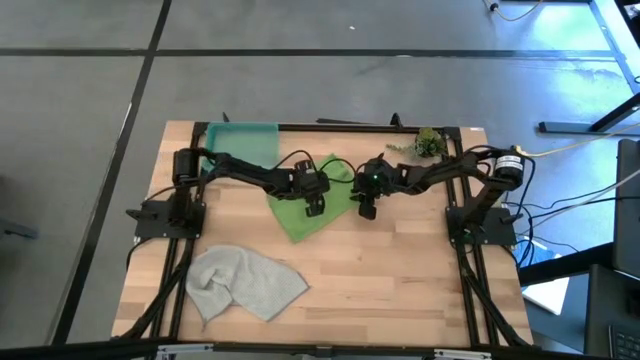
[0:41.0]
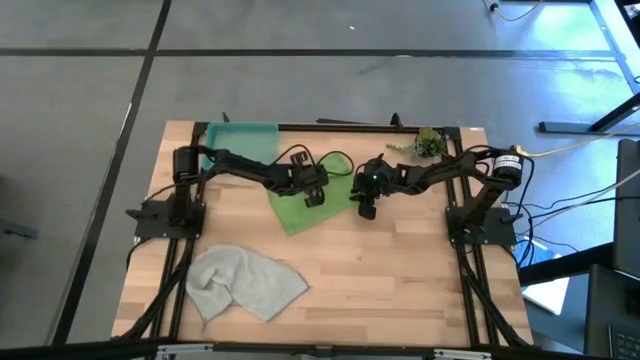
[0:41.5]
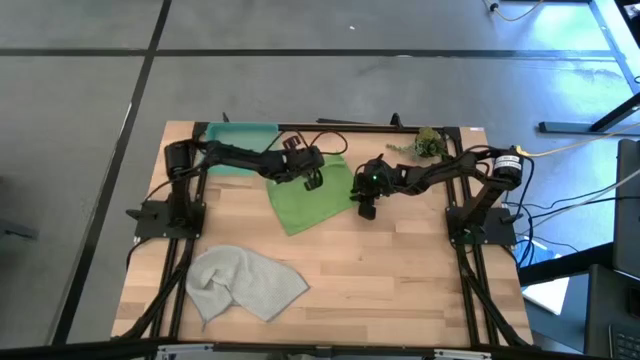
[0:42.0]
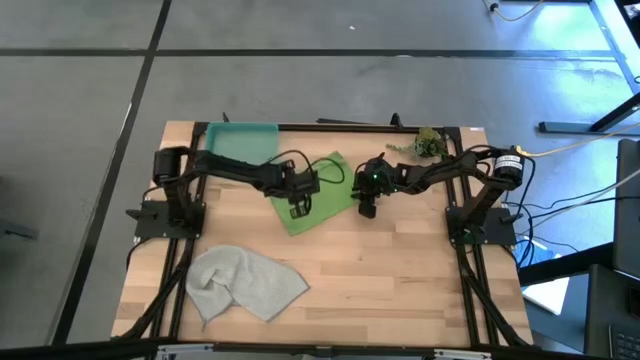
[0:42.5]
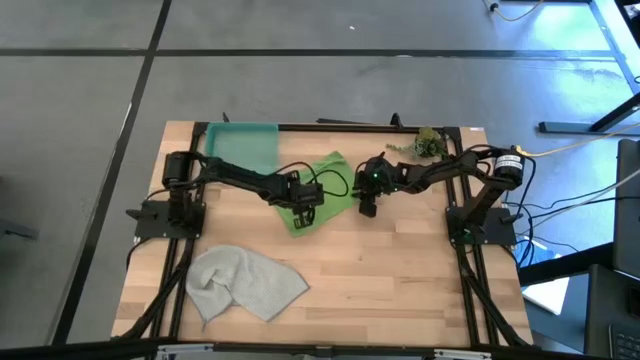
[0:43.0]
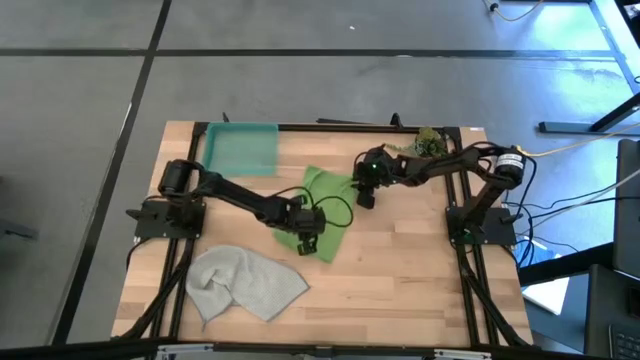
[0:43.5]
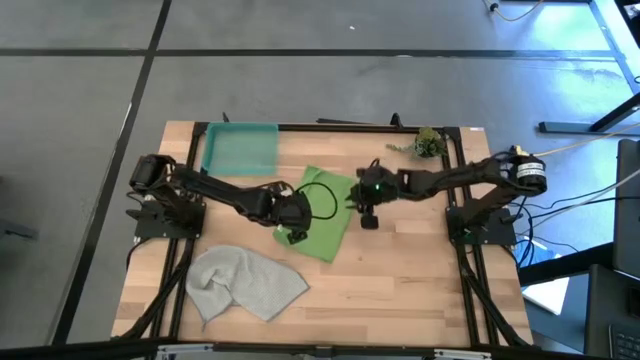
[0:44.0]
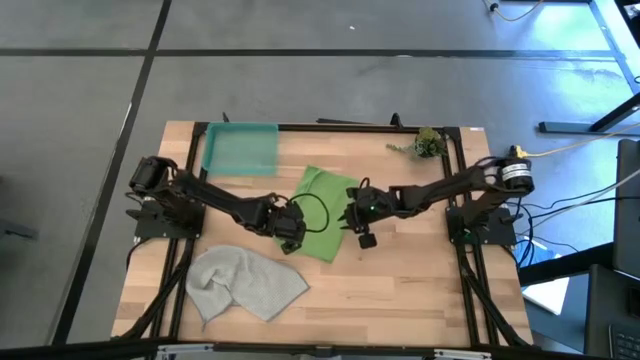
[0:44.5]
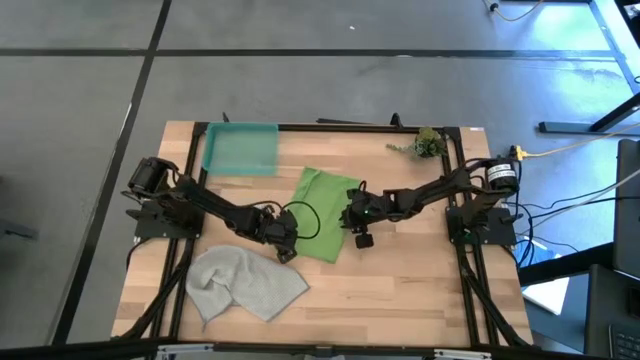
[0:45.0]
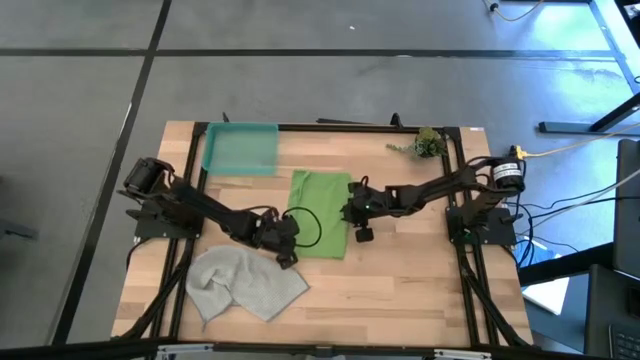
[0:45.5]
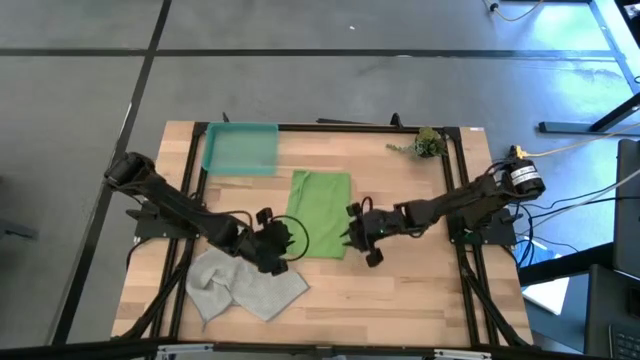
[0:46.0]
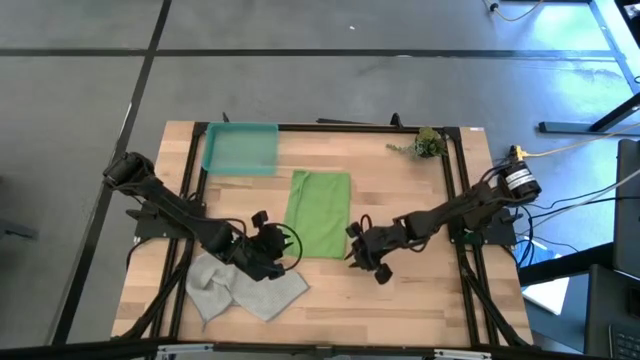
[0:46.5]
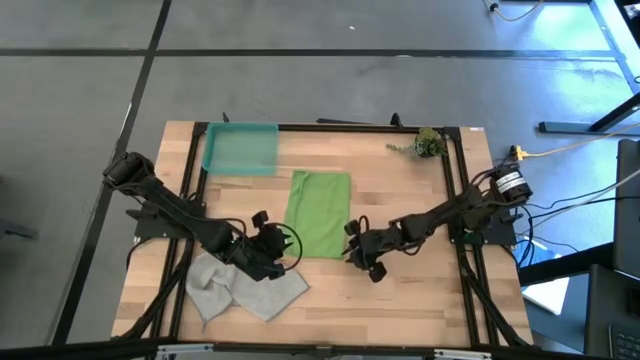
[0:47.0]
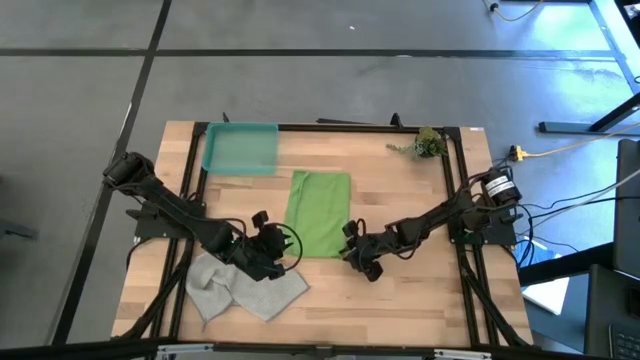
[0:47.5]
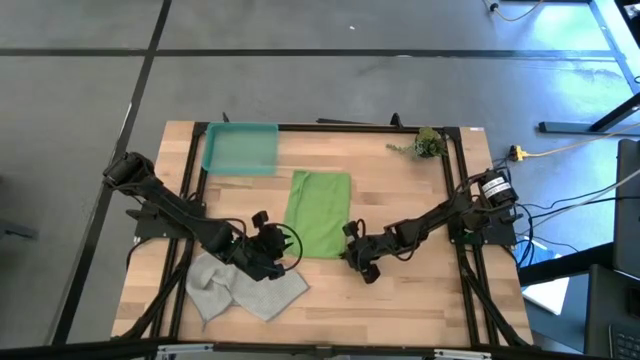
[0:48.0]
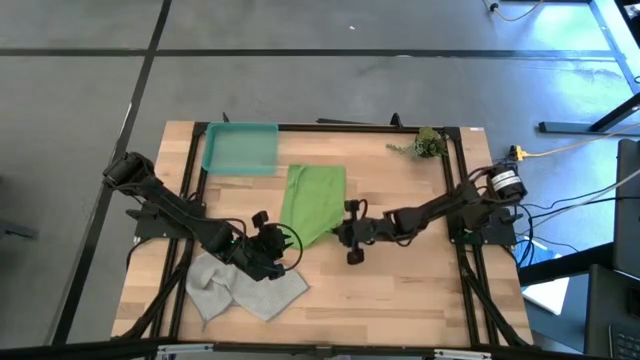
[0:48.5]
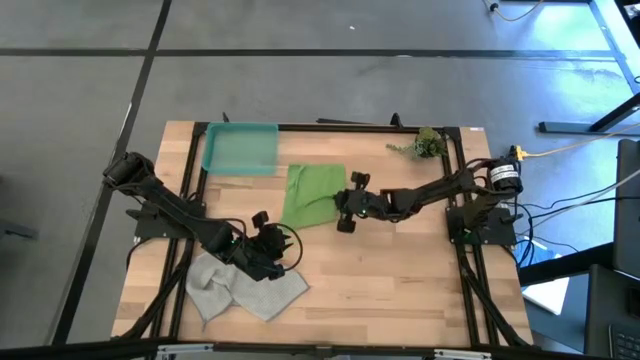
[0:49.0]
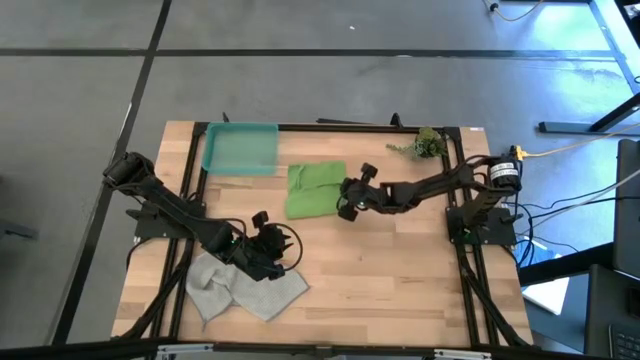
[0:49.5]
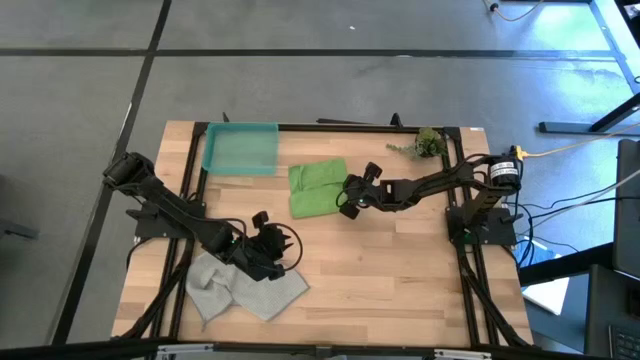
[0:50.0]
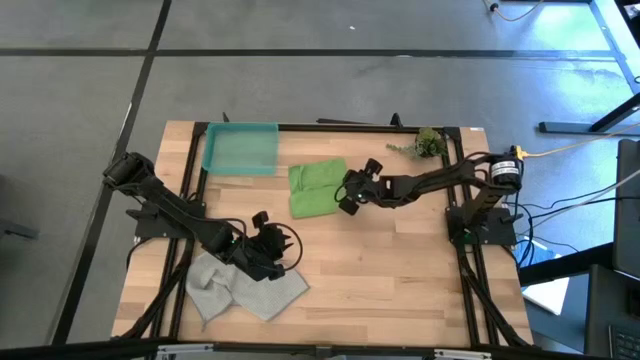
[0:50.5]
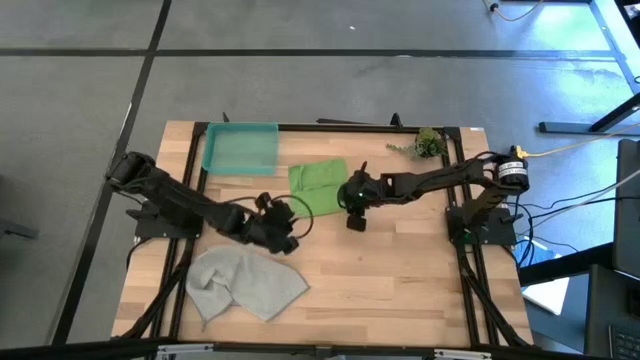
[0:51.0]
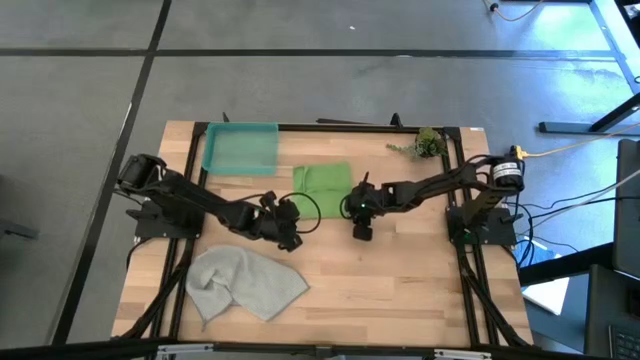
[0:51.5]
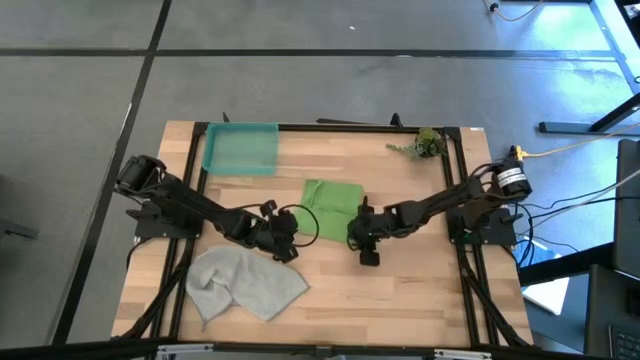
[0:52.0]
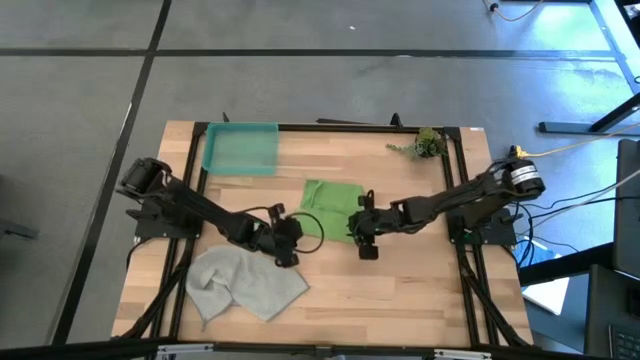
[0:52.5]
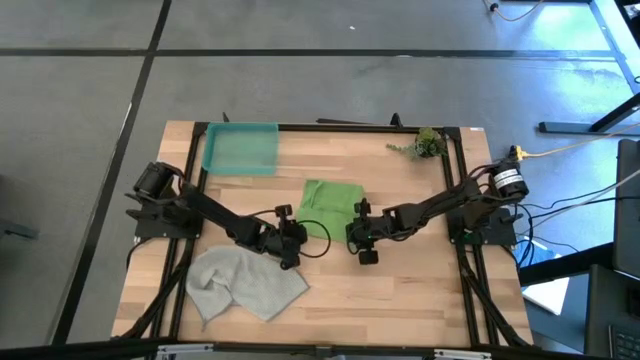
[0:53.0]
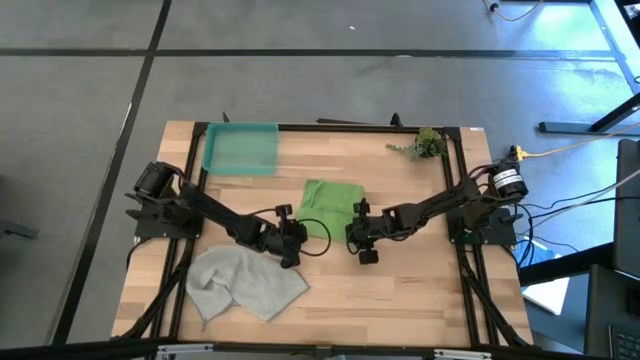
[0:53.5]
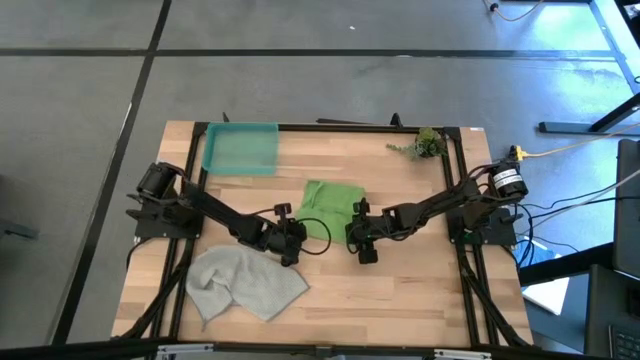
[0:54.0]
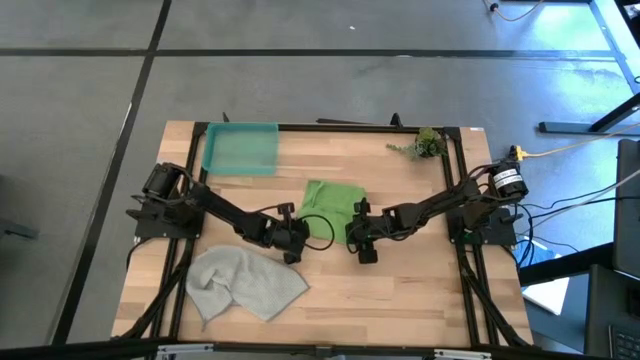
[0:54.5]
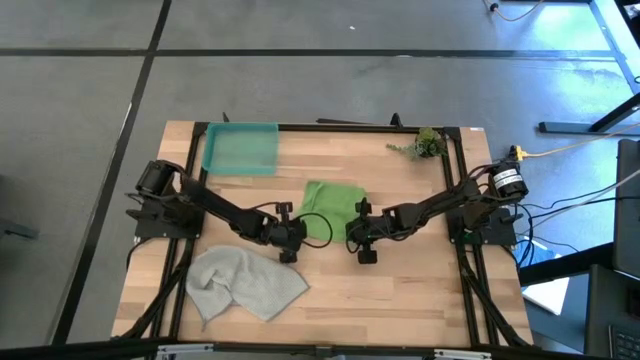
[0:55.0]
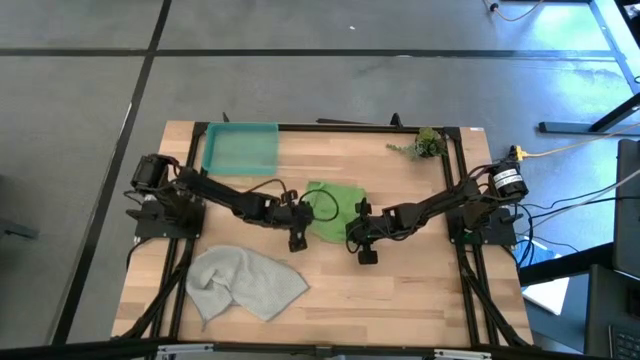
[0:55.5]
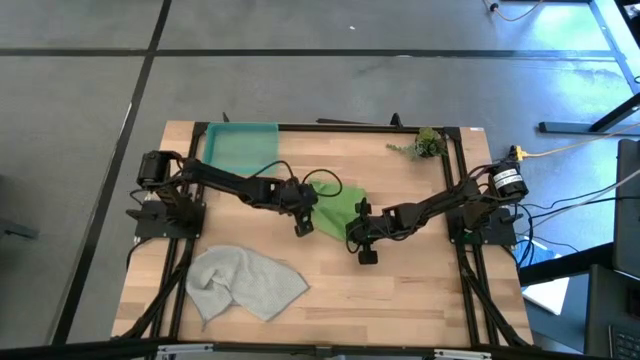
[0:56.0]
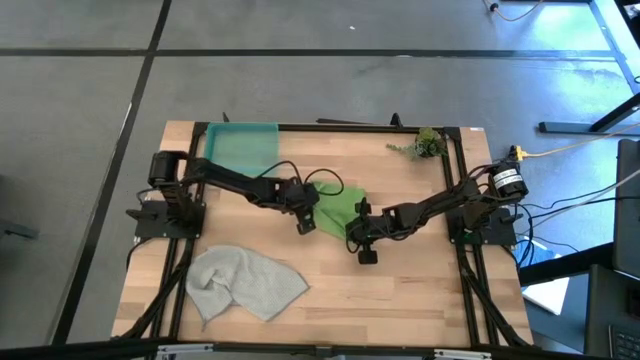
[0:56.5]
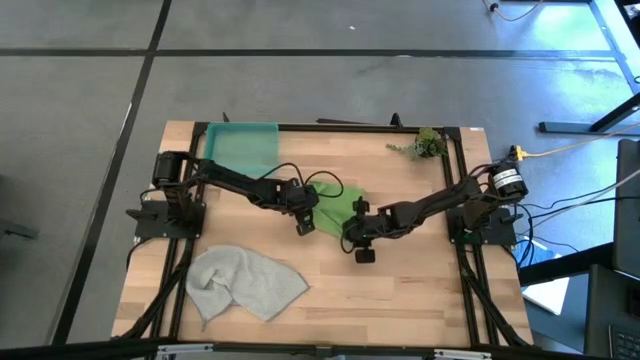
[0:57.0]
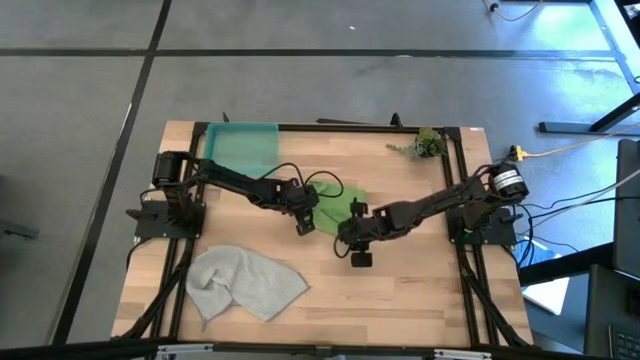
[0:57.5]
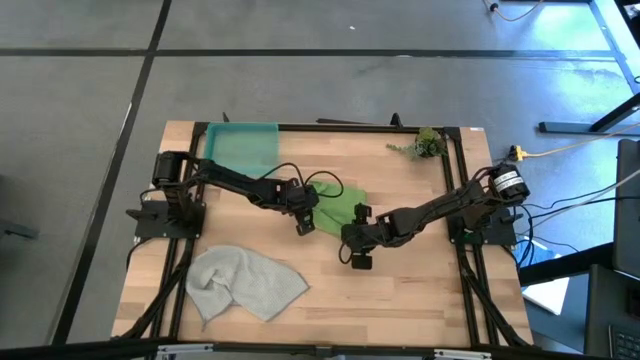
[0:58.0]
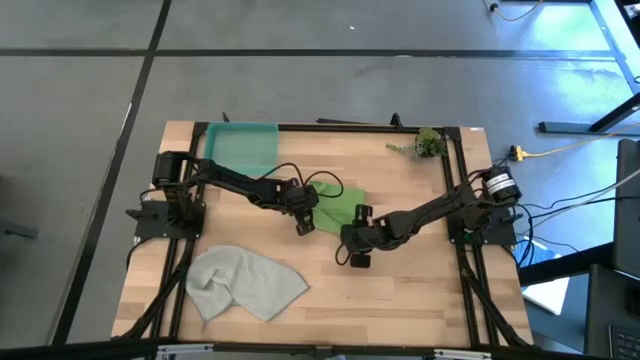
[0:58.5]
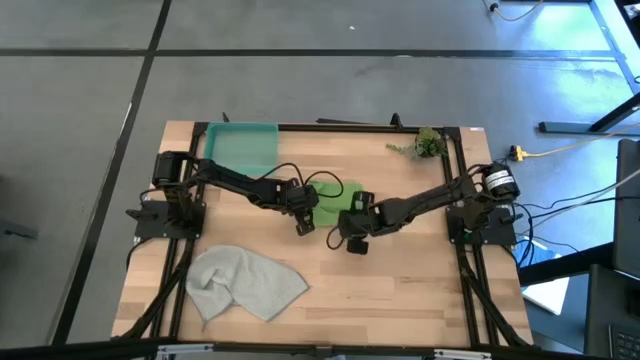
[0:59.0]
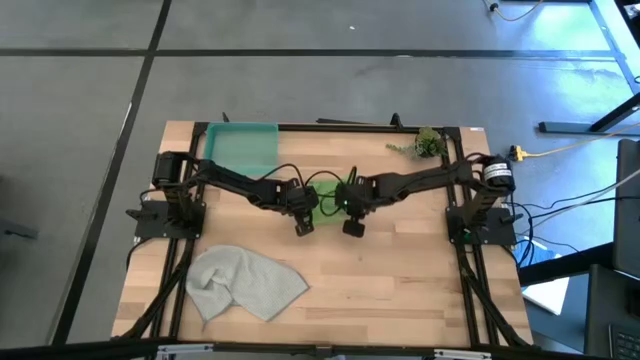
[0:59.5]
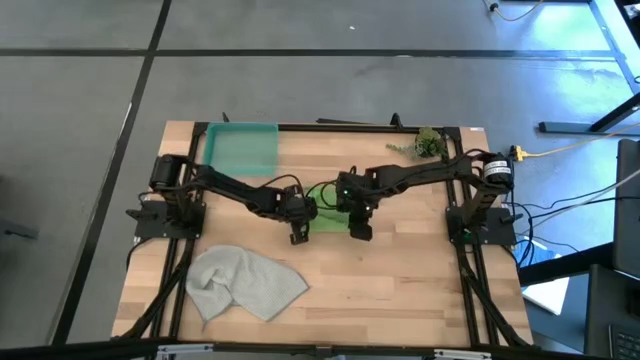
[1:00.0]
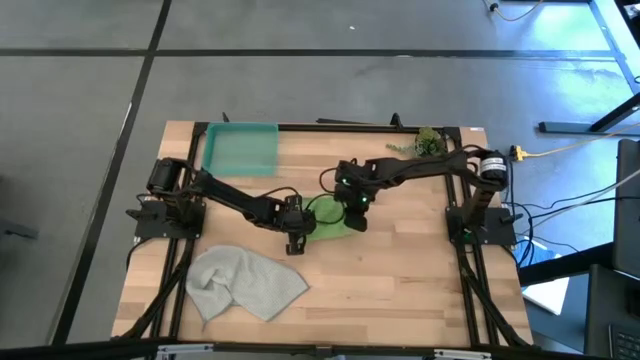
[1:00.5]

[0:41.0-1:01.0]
Task: Roll microfiber towels into tight, uniform cylinder then place into a basket
Roll the green towel
